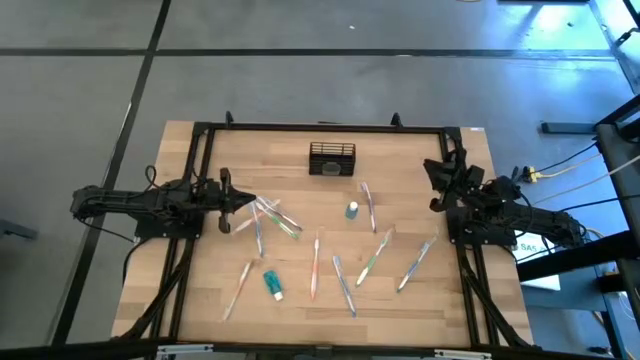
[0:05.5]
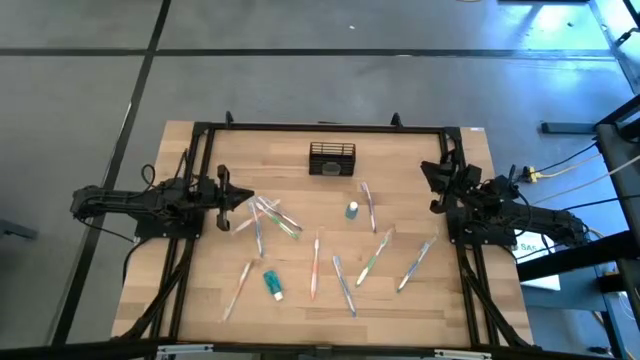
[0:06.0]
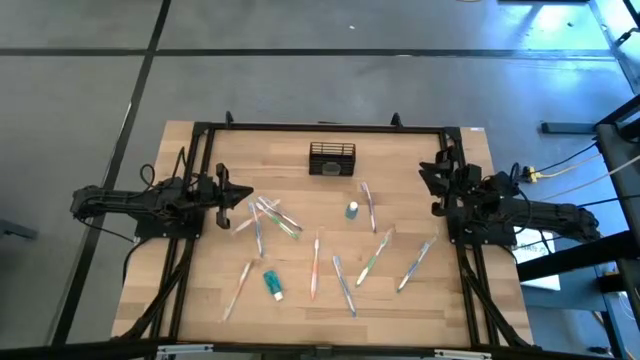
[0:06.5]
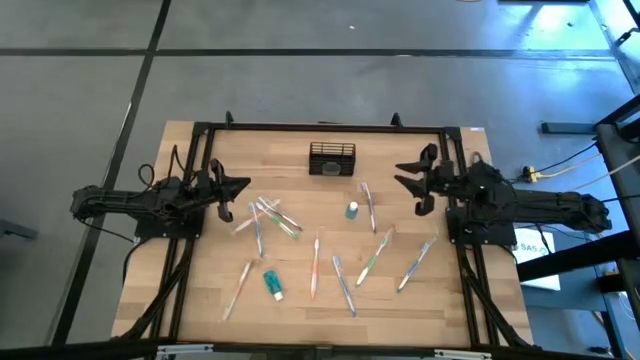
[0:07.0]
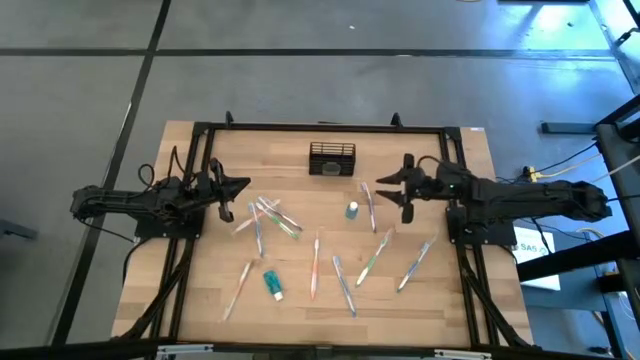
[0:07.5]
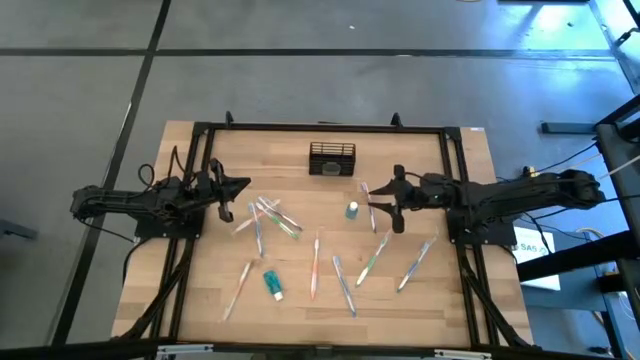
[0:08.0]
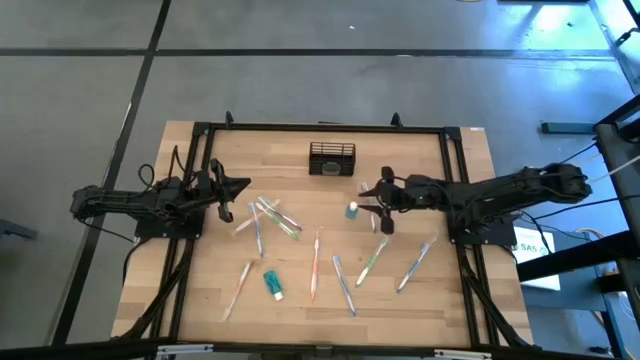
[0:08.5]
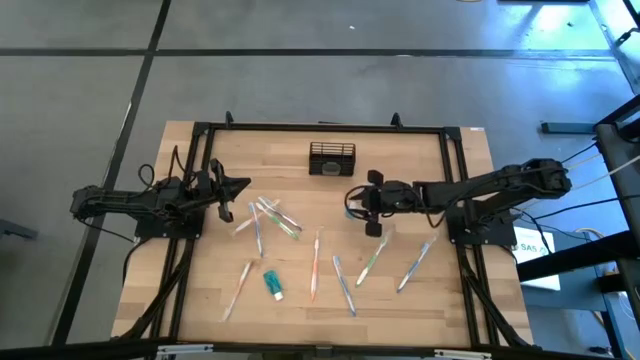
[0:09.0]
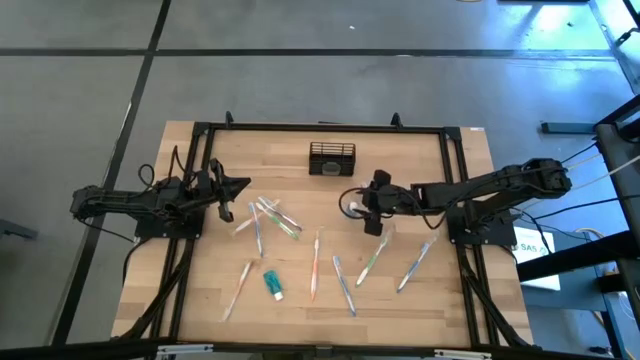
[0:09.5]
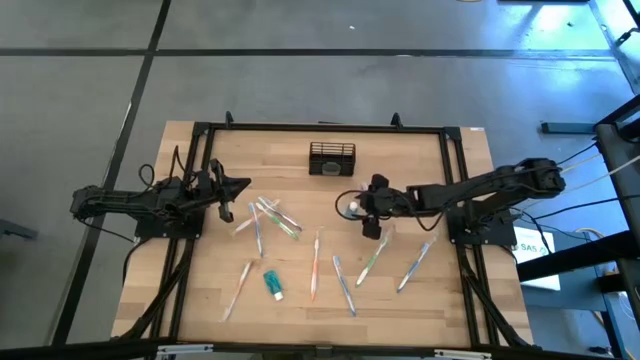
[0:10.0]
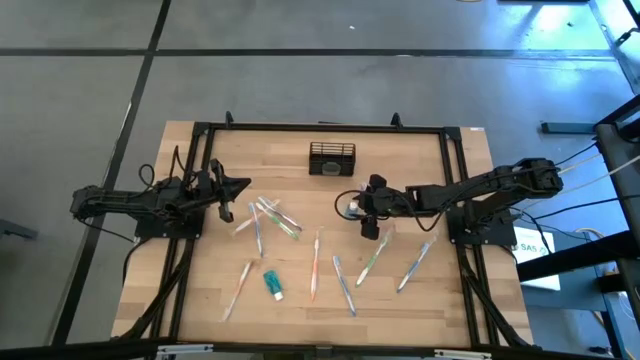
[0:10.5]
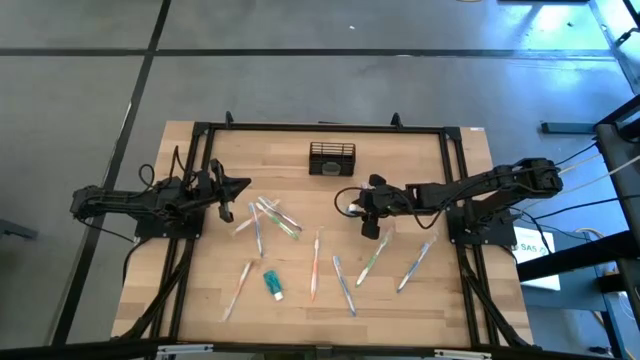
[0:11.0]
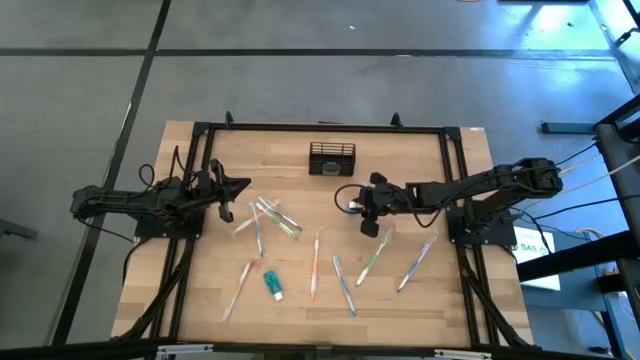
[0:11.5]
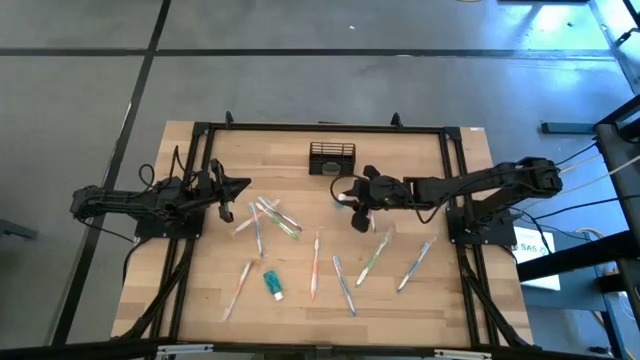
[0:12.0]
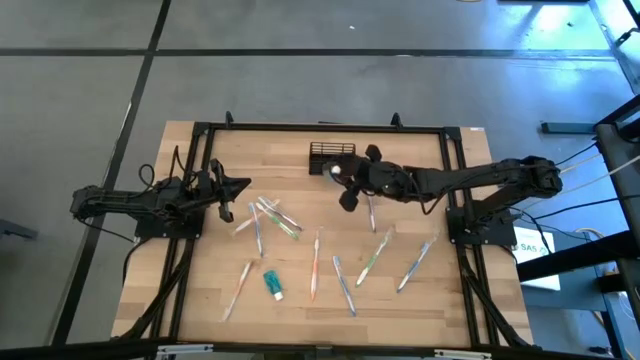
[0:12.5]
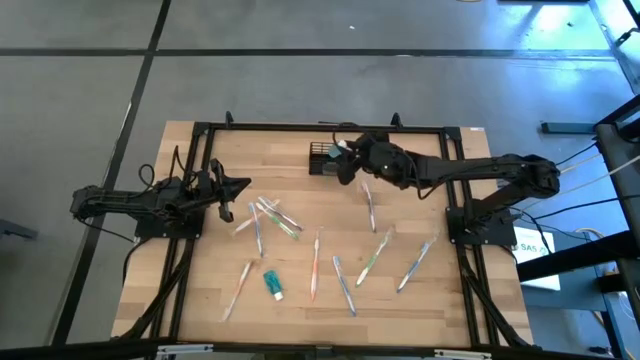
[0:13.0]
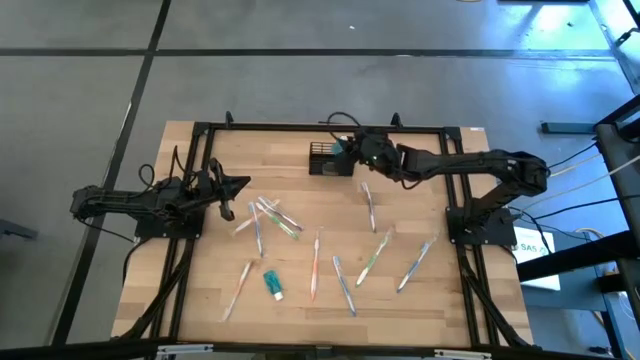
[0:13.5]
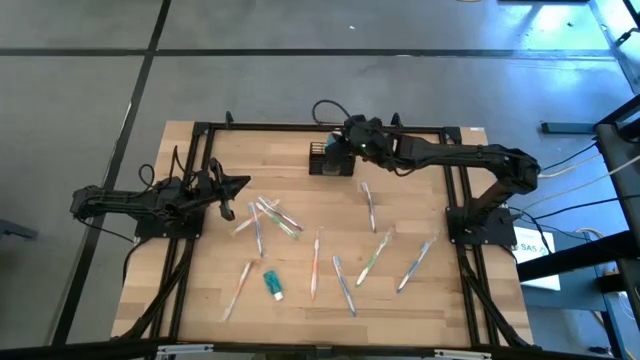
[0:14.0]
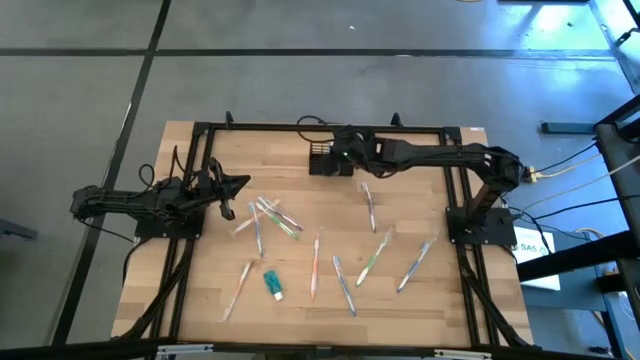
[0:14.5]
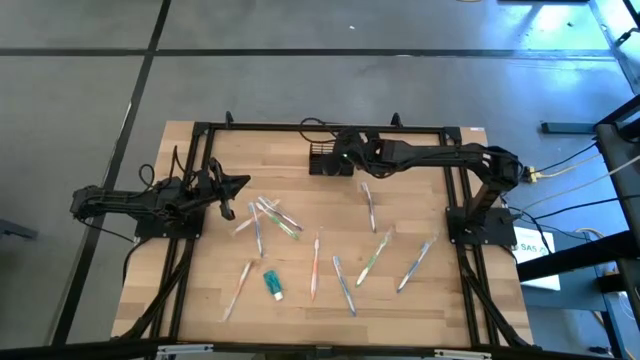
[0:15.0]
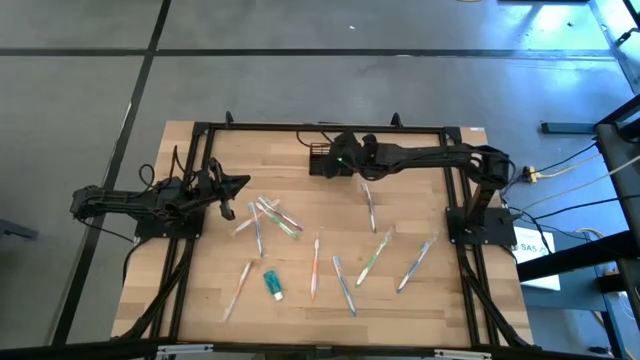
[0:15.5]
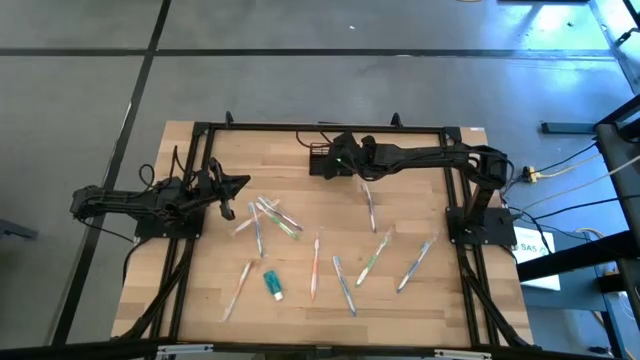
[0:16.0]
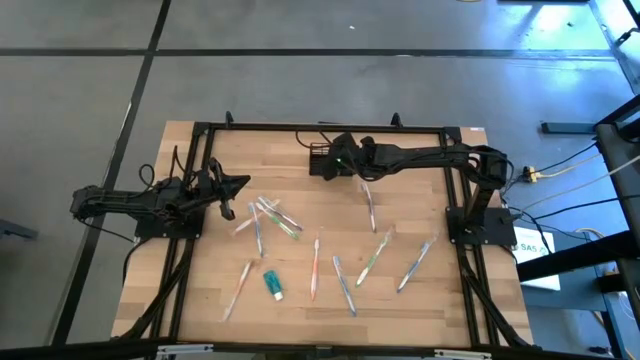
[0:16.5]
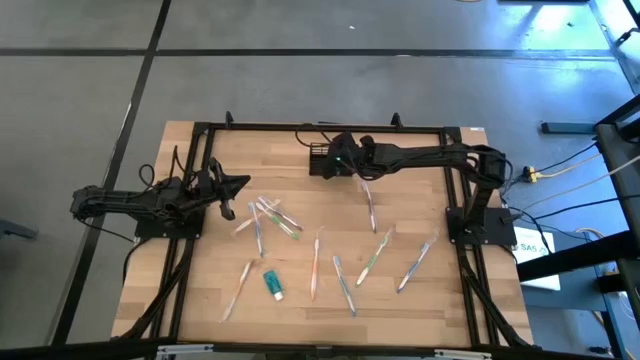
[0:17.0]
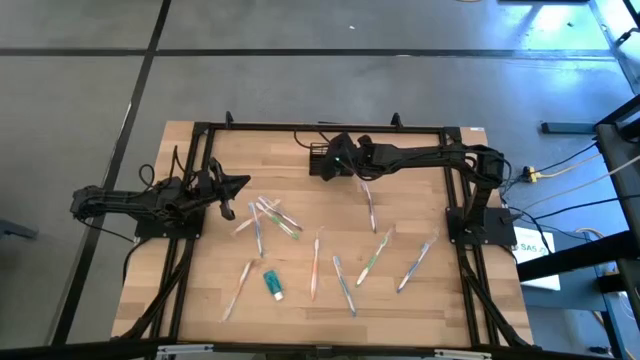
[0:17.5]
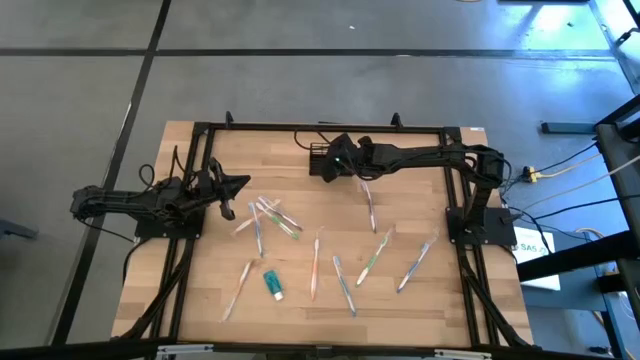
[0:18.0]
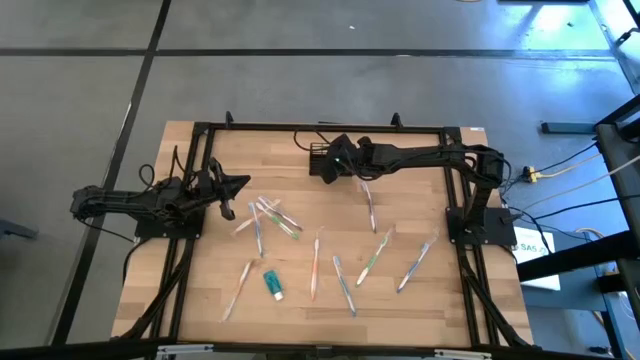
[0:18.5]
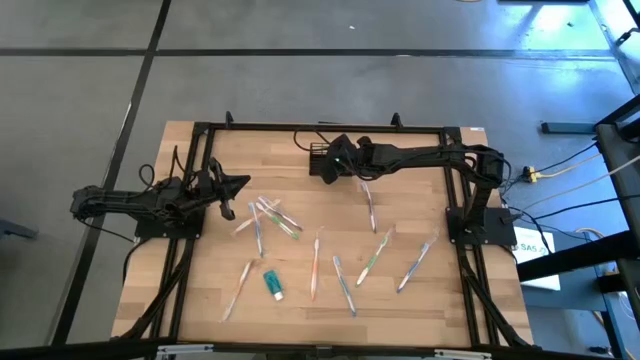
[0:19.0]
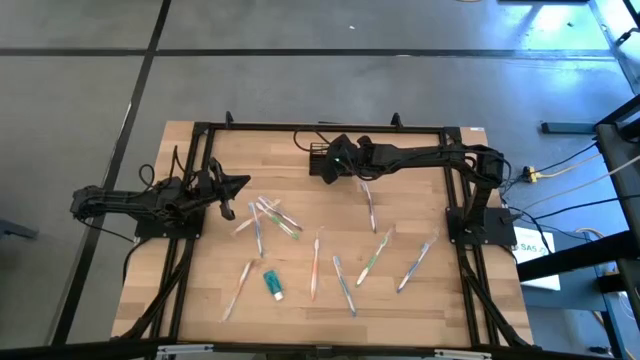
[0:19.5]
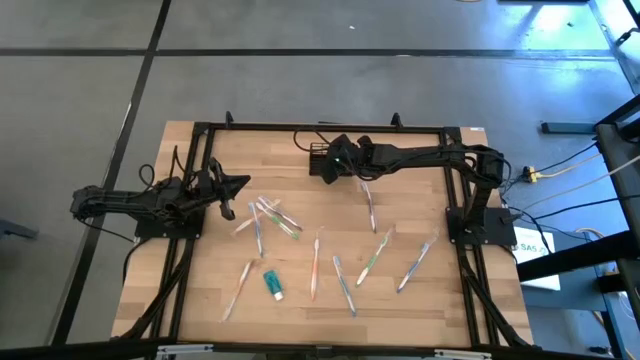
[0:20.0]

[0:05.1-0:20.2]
Task: Pick & Place toothbrushing station
Put the top mouthwash into the middle section of the wire organizer

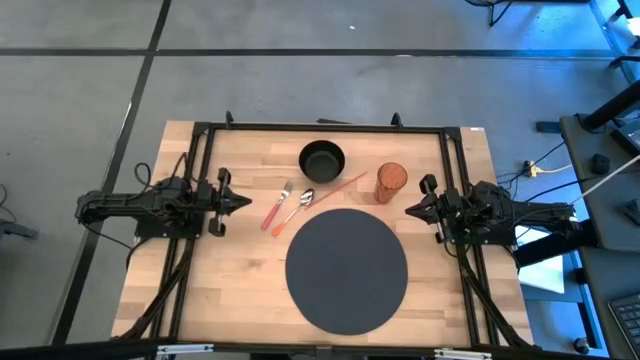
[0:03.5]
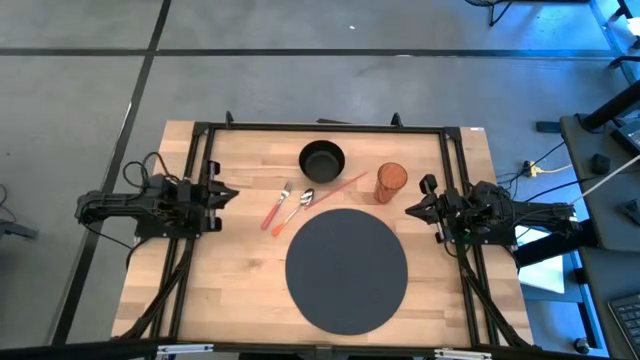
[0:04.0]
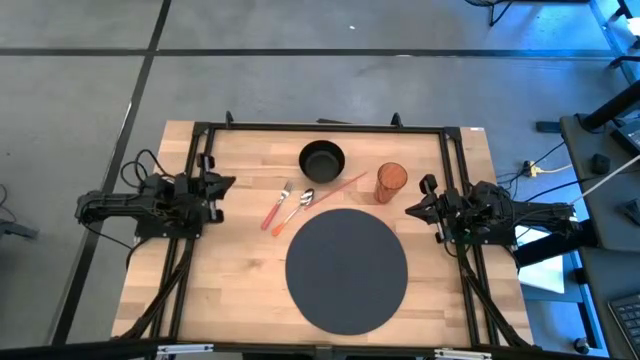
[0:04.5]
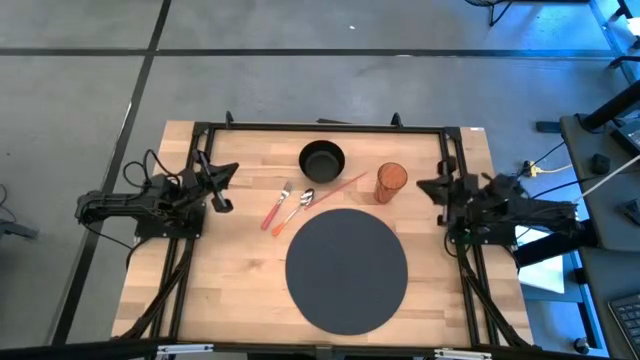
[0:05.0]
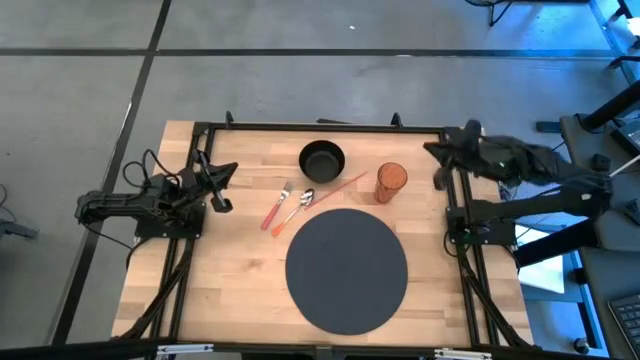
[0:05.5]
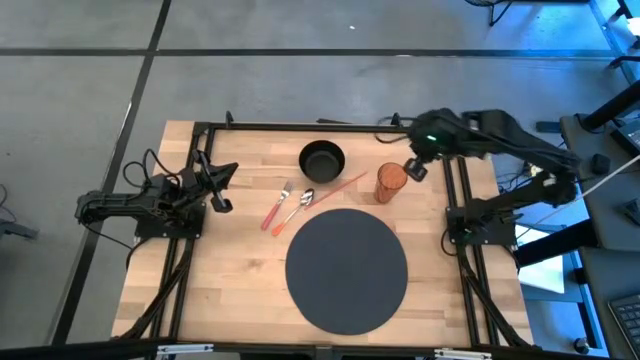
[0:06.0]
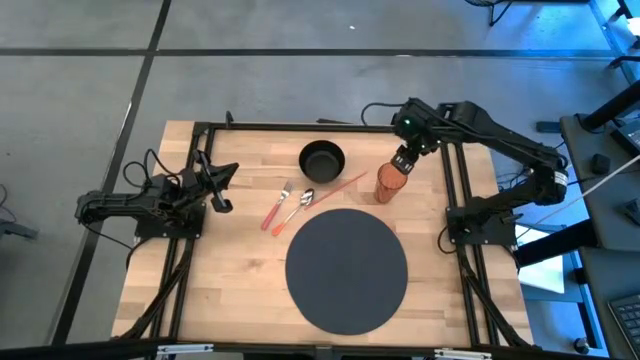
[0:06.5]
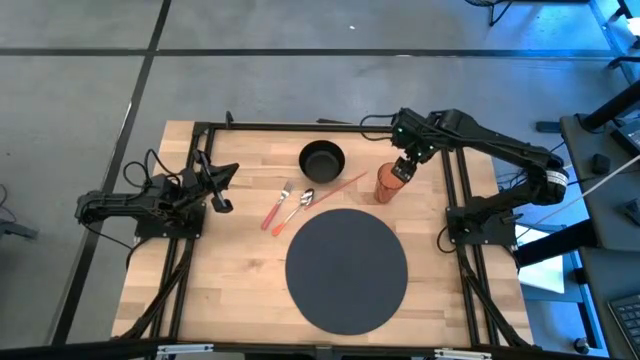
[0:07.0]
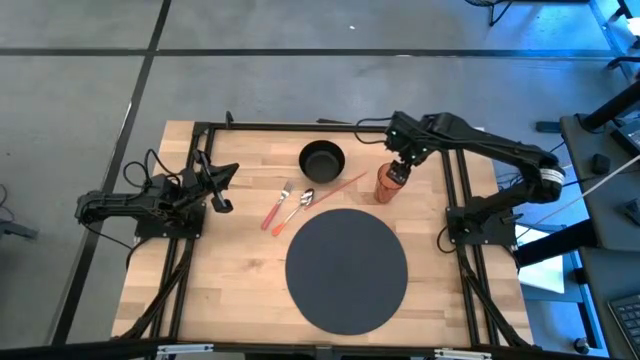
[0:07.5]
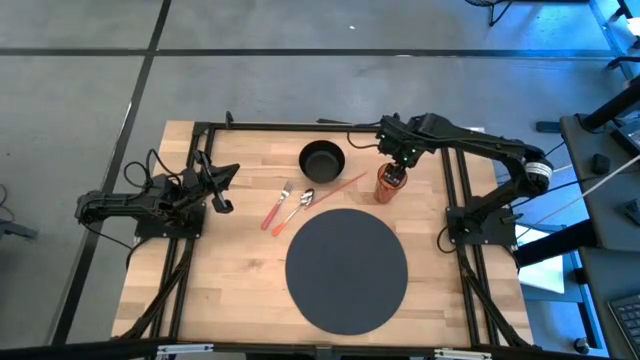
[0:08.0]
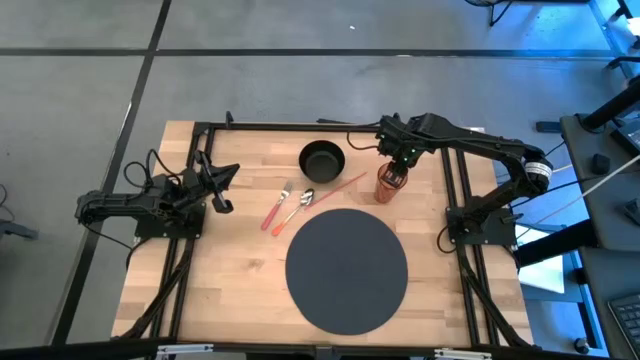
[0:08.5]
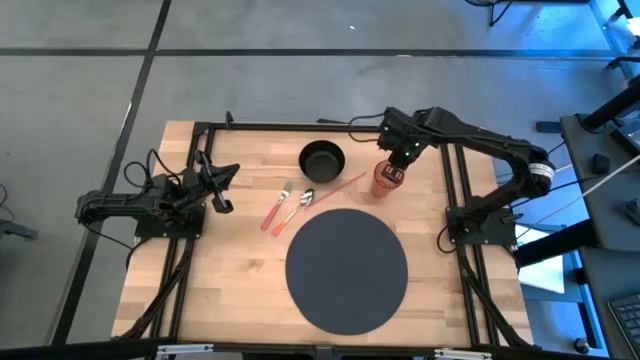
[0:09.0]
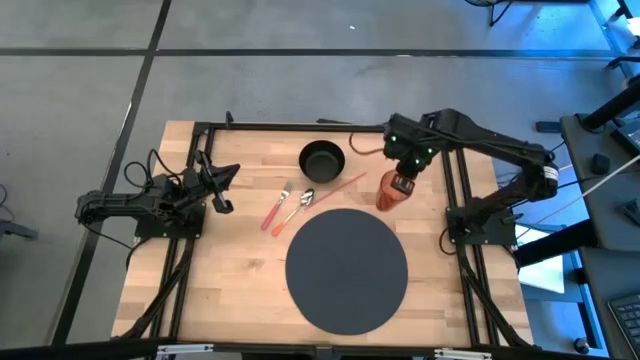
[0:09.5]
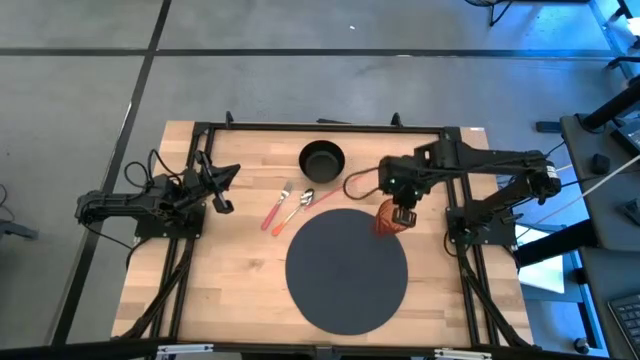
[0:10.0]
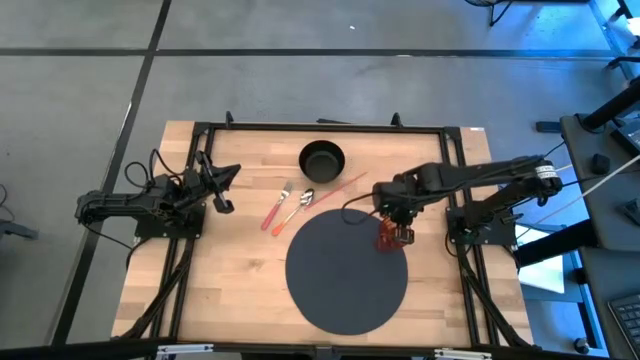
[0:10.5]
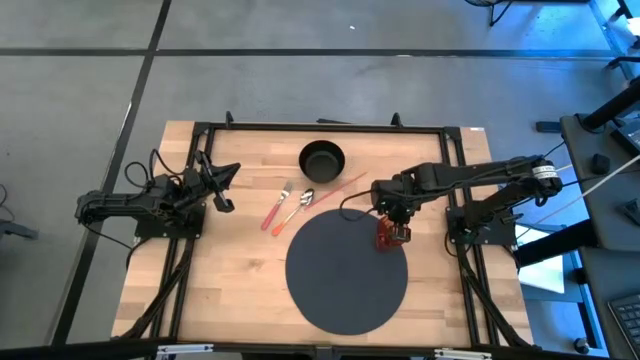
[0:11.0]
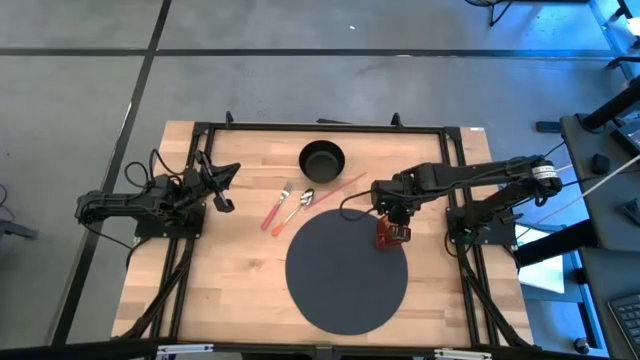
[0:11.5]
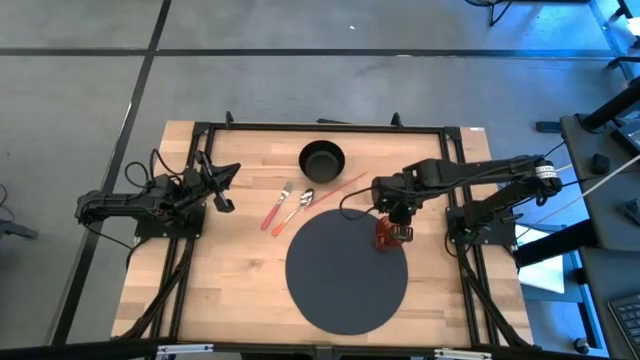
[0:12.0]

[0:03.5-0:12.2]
Task: Pick & Place Utensil
Put the brown glass on the top right of the gray mat
